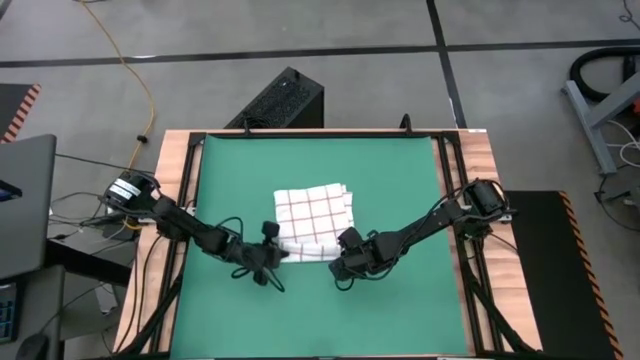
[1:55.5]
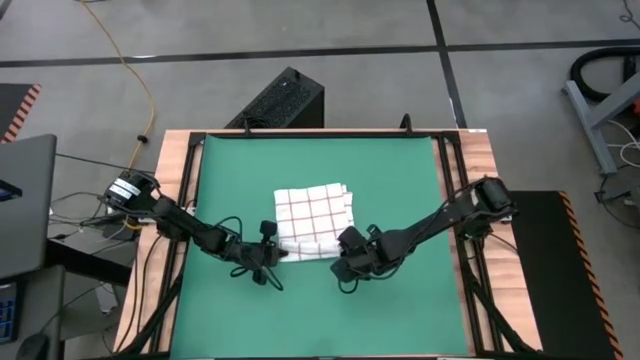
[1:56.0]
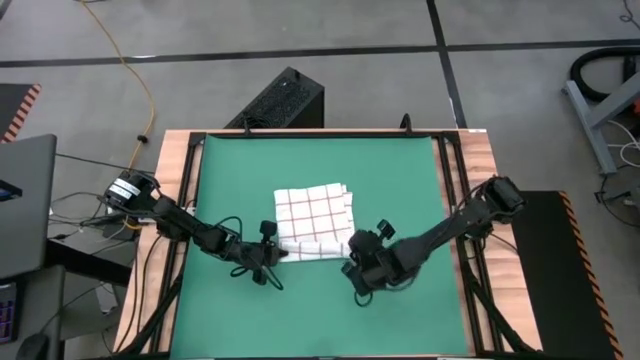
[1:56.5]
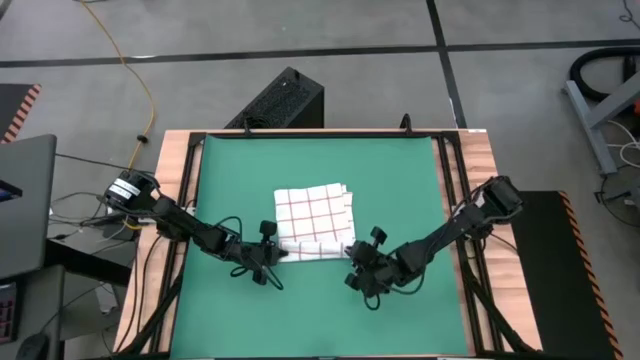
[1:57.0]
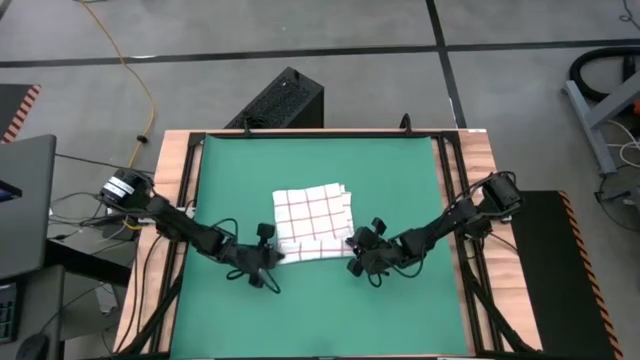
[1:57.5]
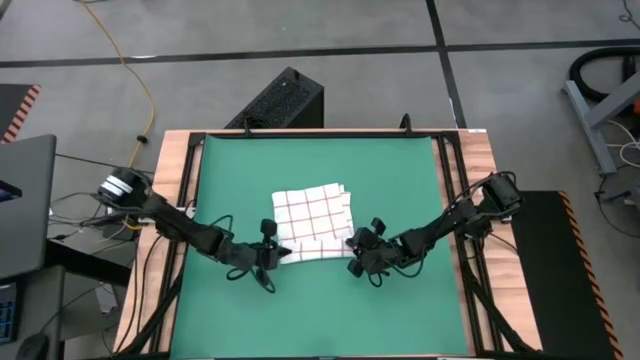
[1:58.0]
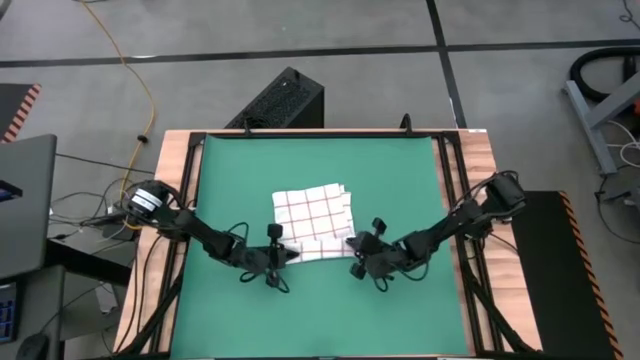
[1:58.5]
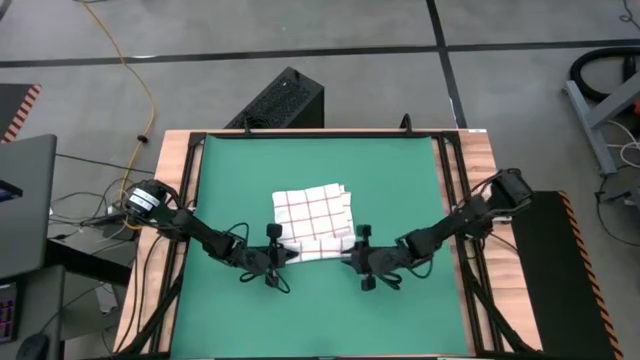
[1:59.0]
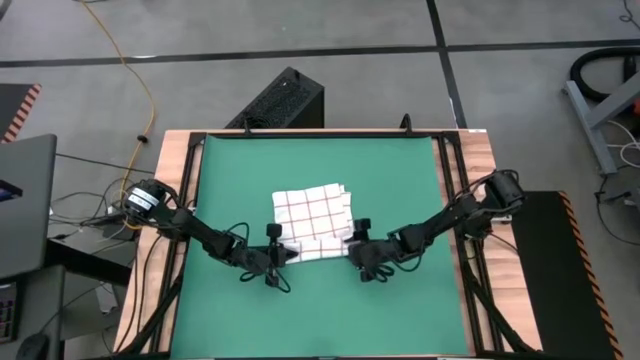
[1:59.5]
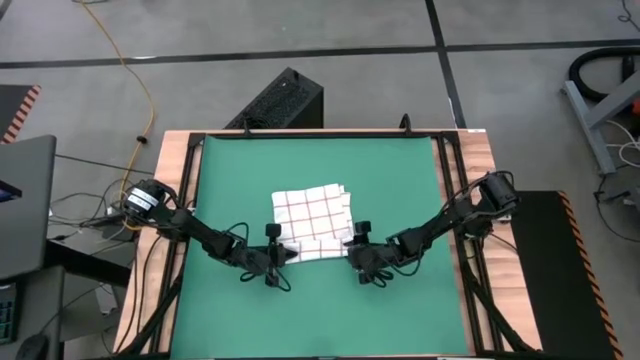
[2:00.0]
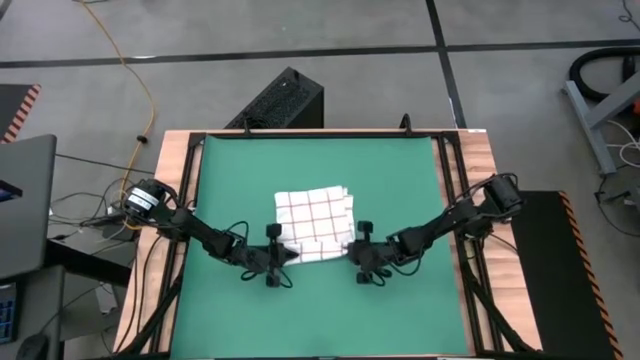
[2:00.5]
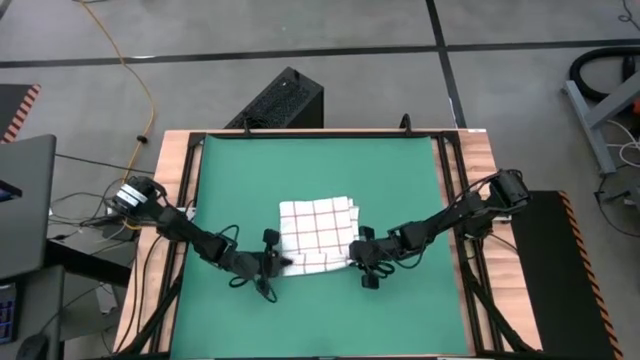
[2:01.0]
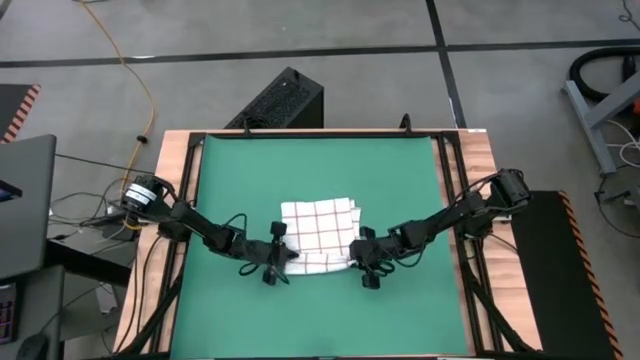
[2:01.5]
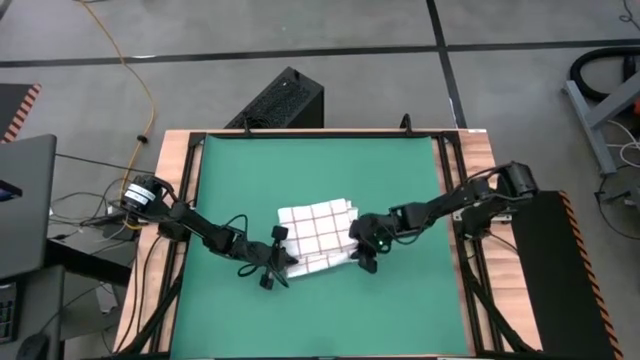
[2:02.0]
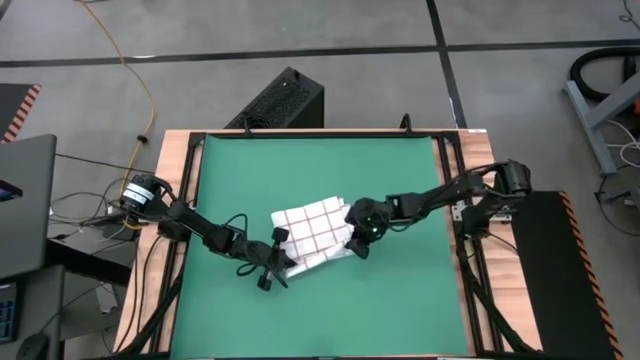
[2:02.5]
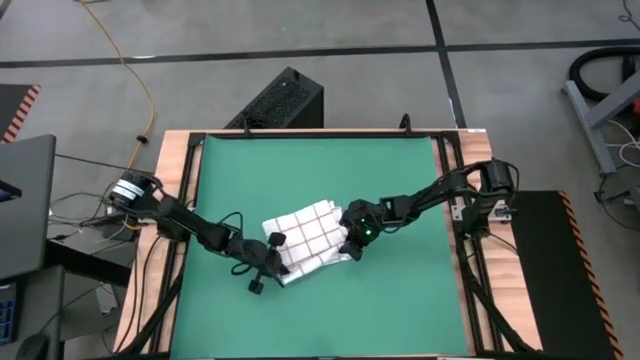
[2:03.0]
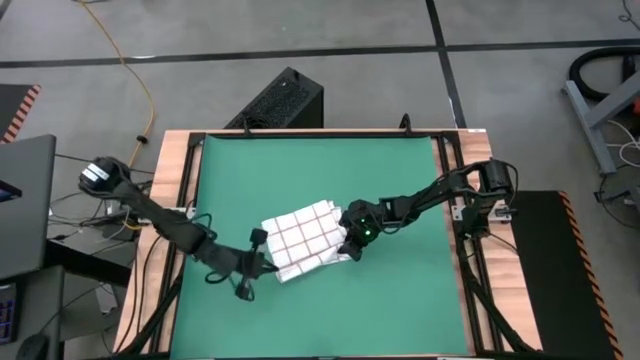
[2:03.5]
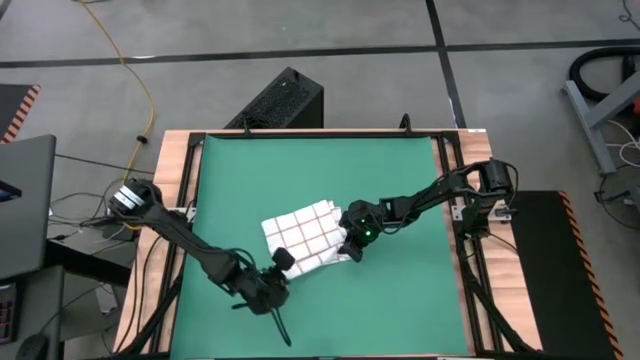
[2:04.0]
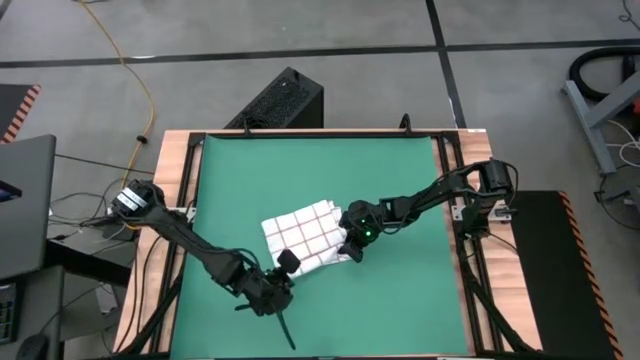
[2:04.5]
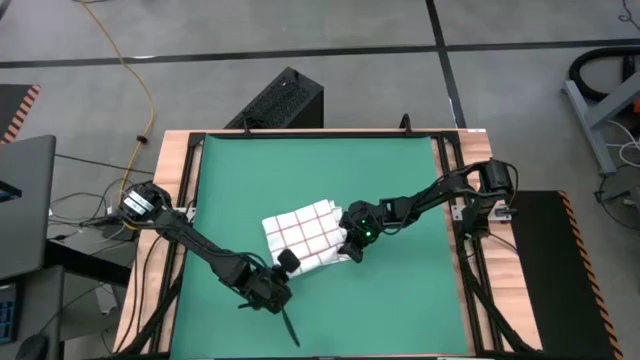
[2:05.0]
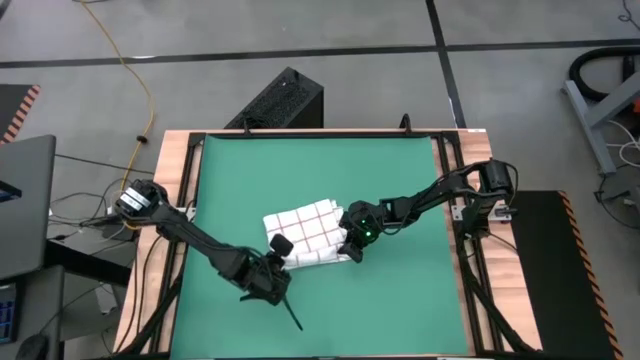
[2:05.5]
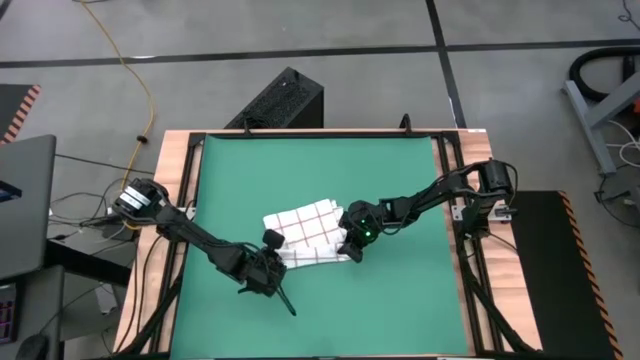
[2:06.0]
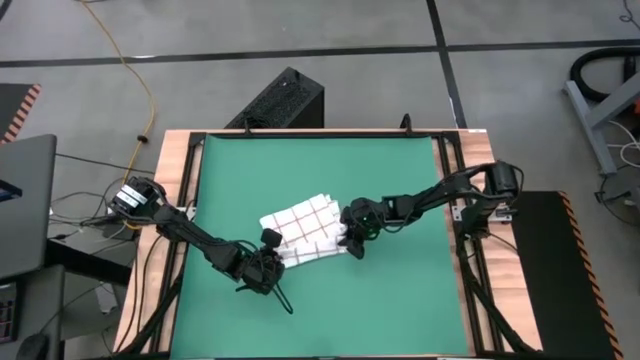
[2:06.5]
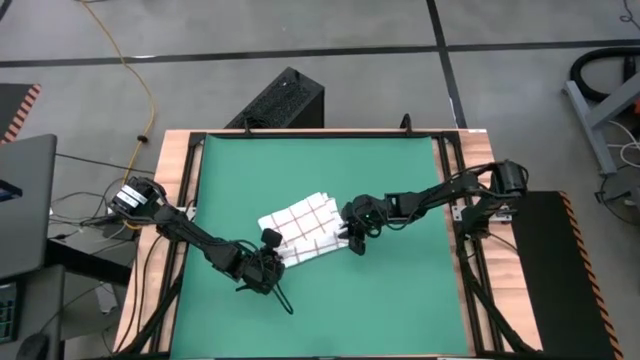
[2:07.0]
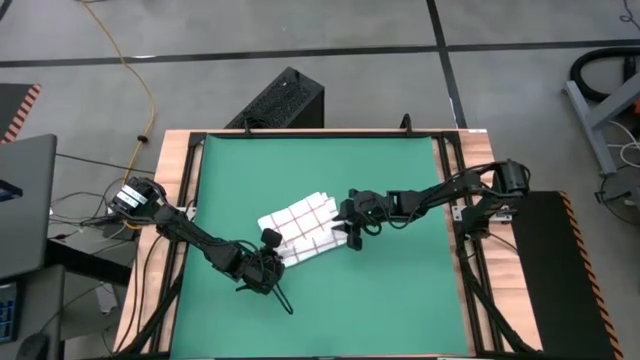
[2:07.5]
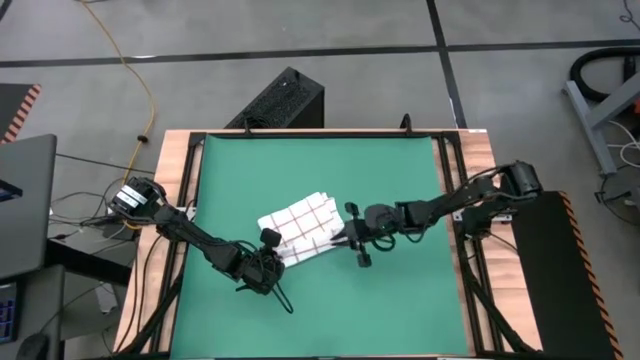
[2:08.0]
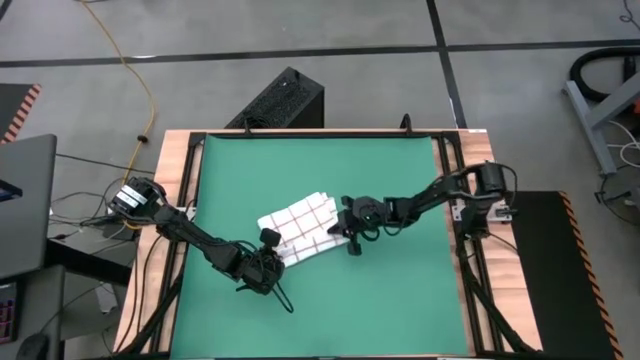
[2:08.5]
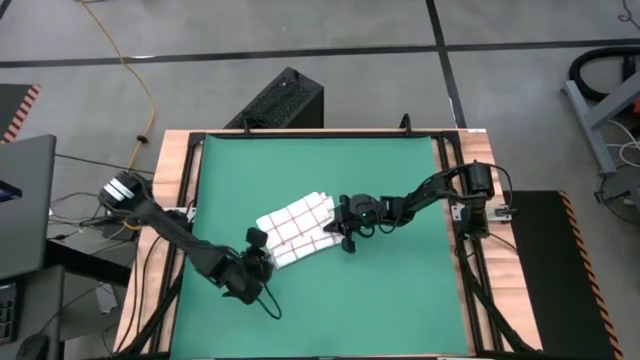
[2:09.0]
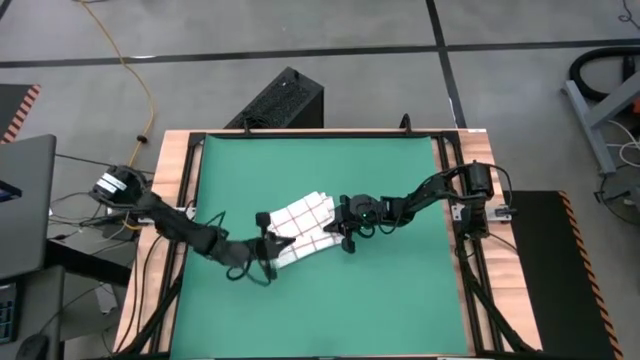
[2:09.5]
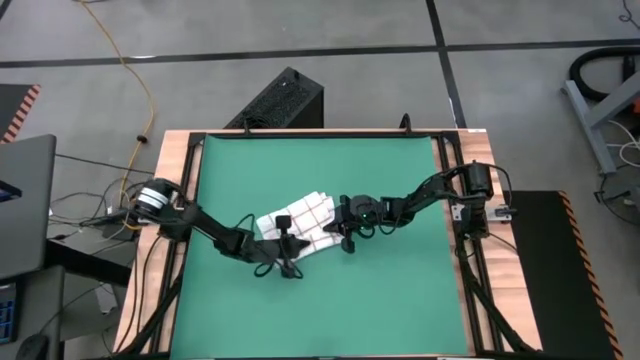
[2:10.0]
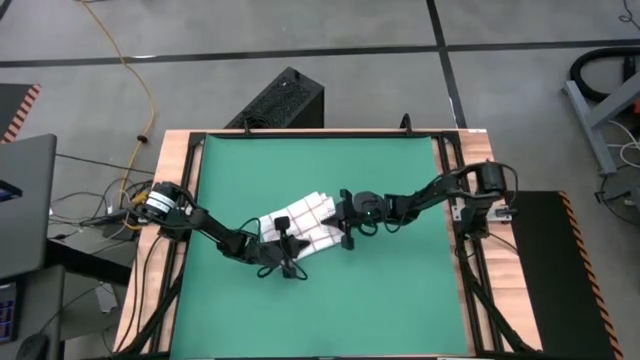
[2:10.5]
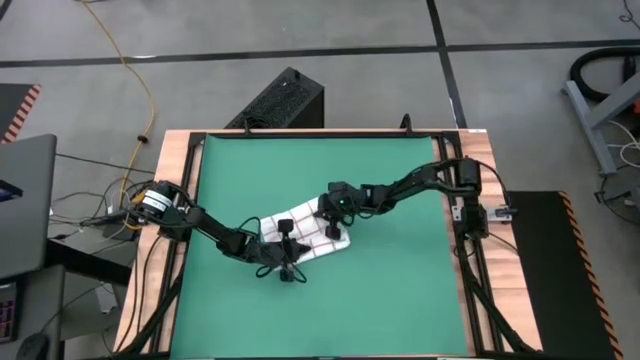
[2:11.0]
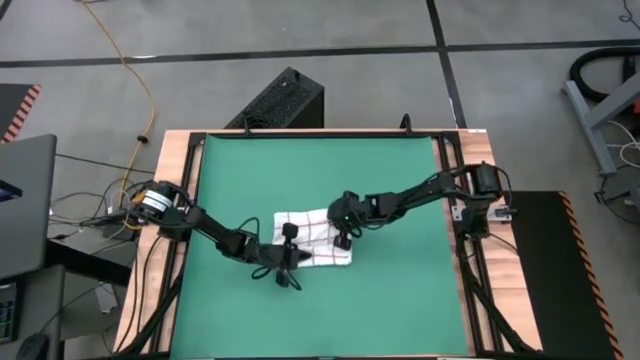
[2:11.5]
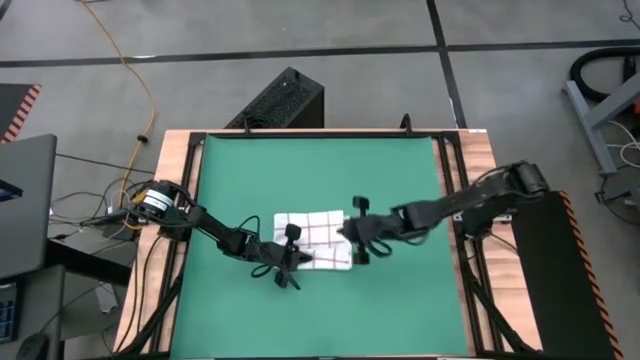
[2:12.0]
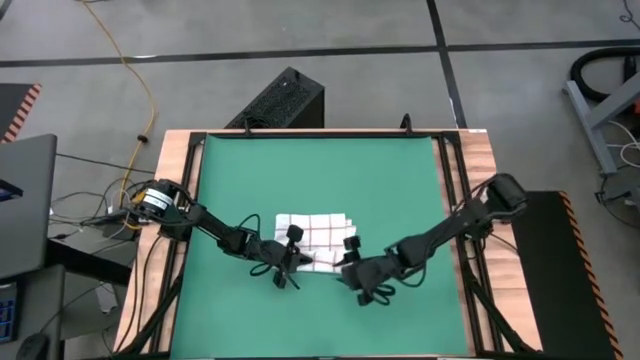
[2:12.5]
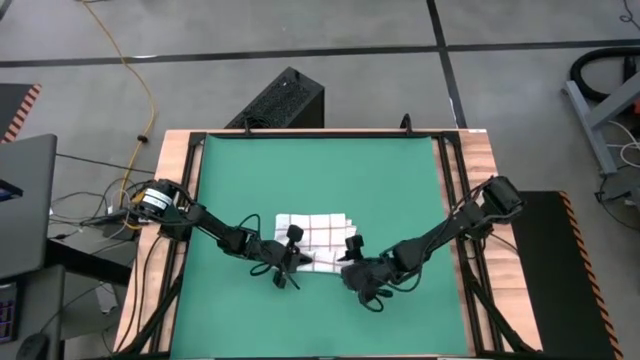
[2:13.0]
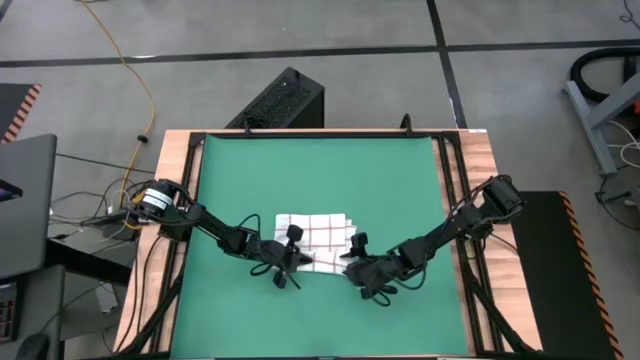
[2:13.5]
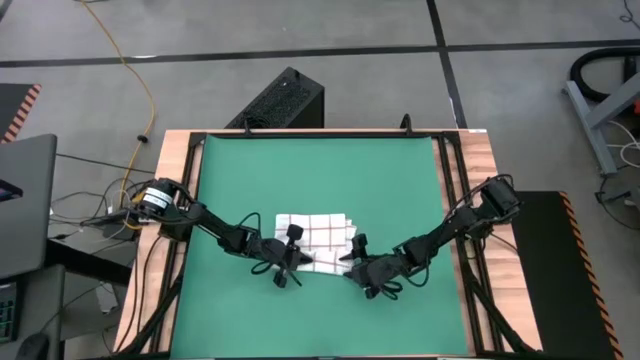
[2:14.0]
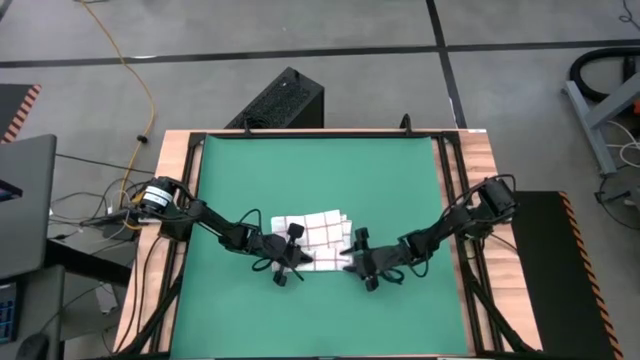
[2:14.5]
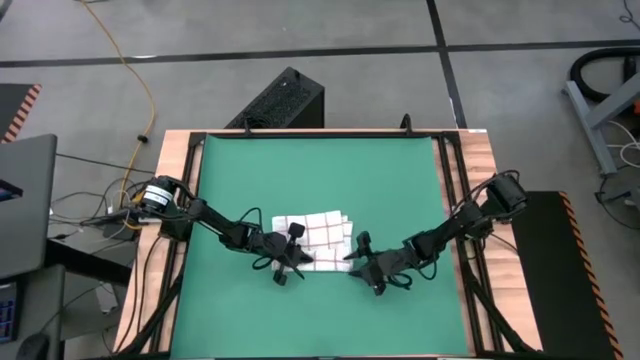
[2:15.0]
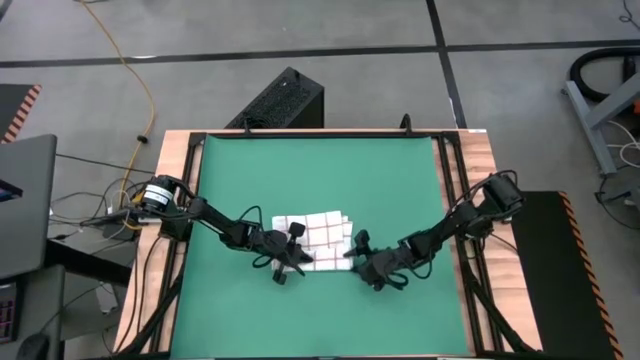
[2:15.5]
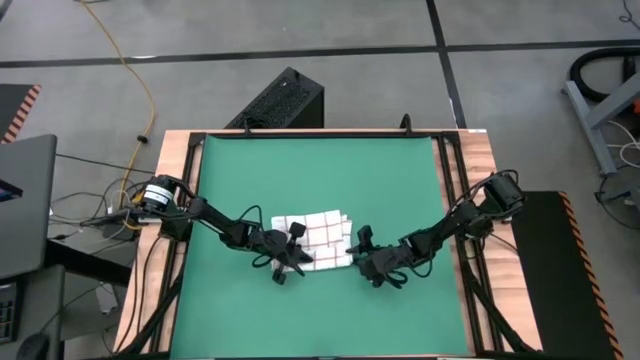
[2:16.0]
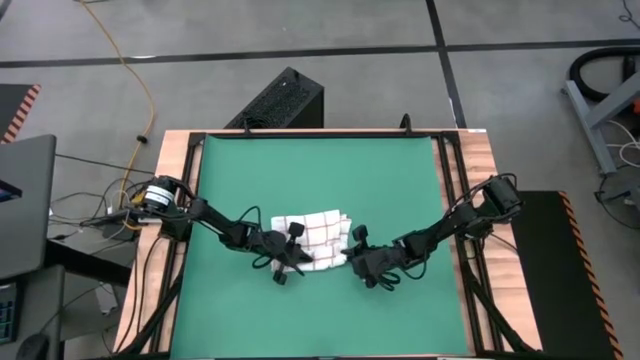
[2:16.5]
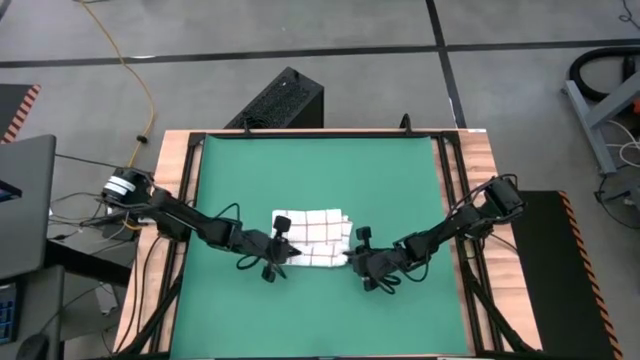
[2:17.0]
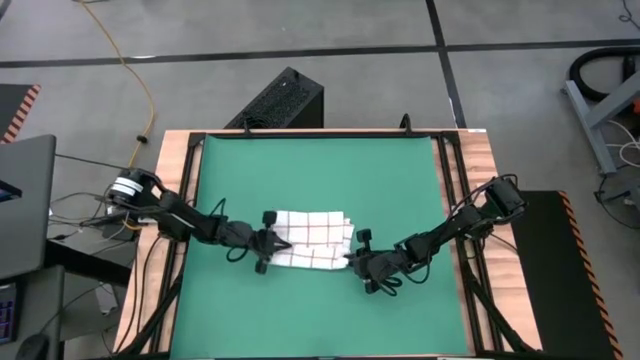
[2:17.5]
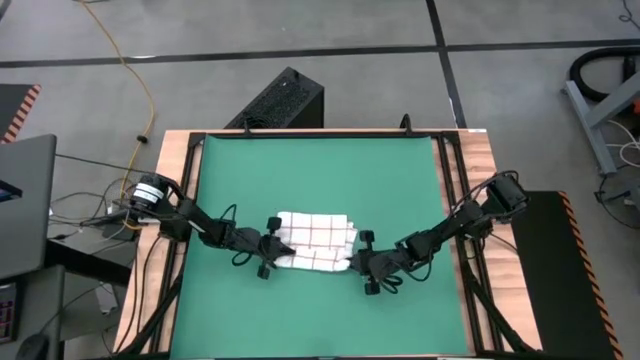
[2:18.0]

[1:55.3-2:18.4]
Task: Roll towel into tight, uniform cylinder
Roll the white towel
